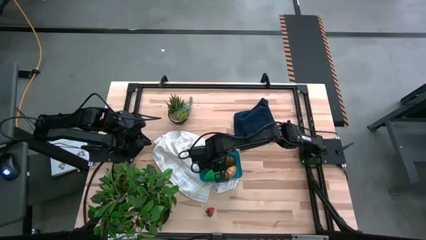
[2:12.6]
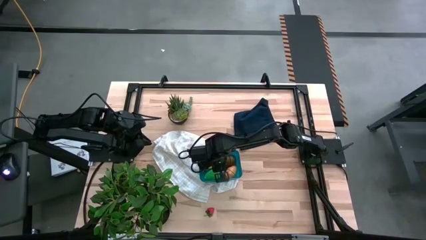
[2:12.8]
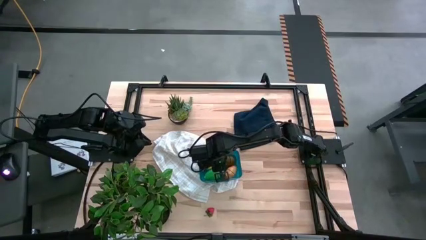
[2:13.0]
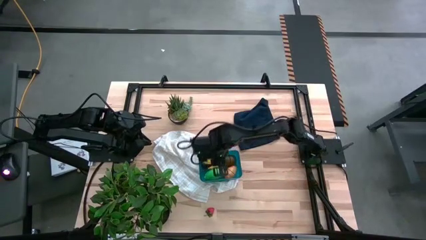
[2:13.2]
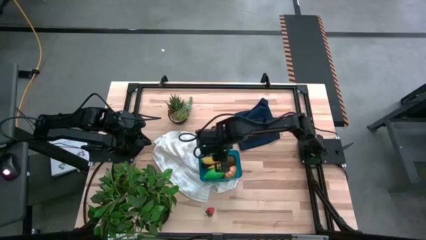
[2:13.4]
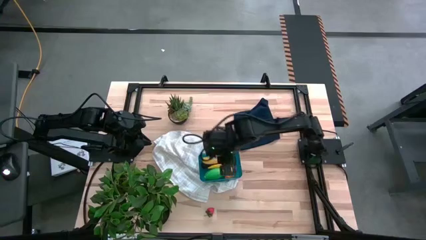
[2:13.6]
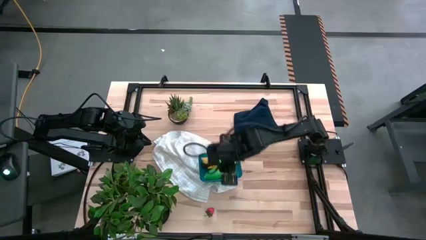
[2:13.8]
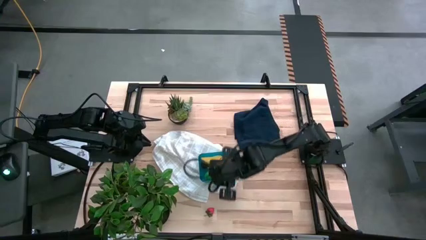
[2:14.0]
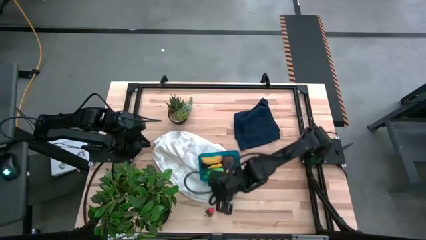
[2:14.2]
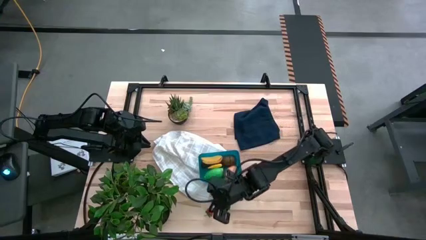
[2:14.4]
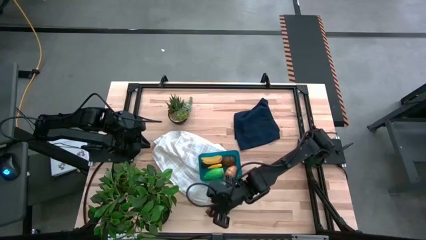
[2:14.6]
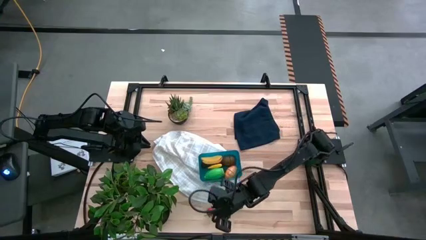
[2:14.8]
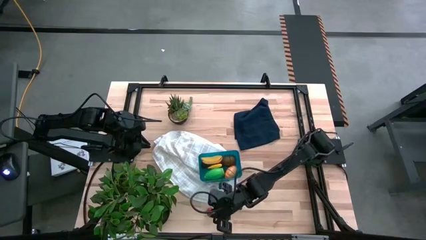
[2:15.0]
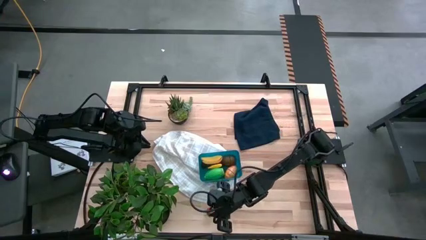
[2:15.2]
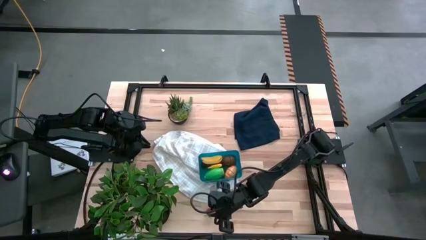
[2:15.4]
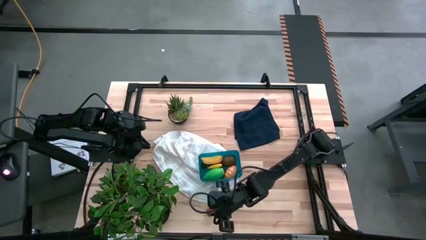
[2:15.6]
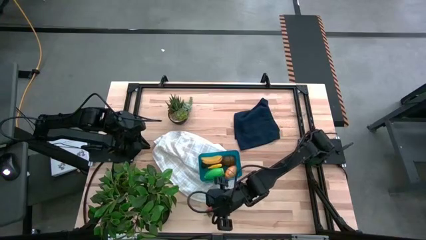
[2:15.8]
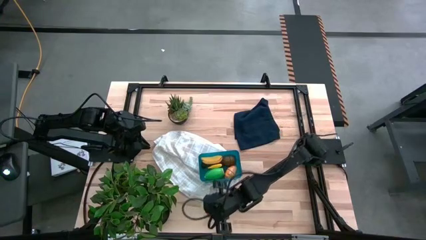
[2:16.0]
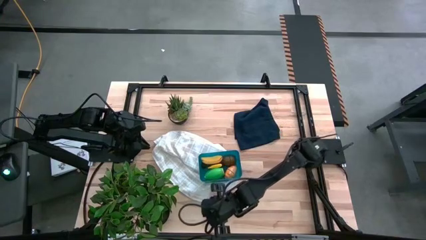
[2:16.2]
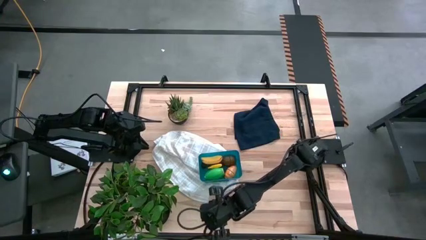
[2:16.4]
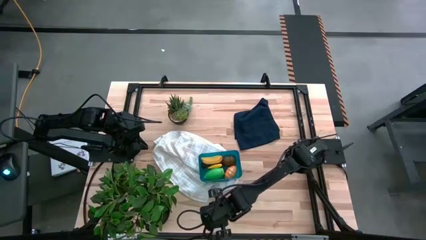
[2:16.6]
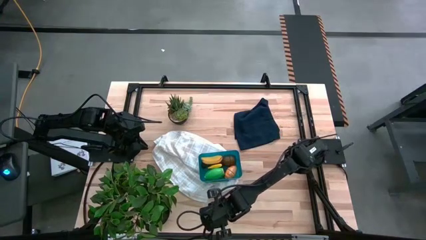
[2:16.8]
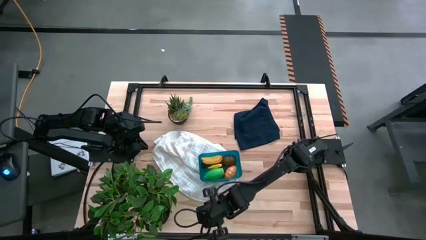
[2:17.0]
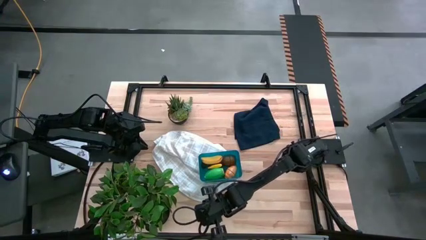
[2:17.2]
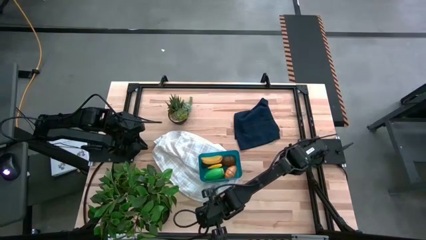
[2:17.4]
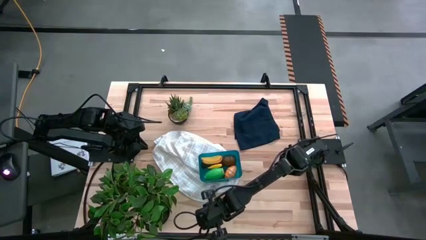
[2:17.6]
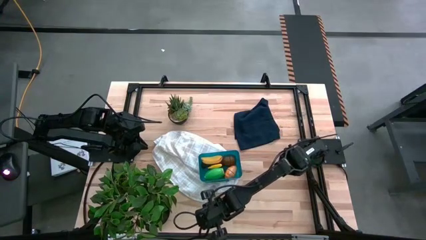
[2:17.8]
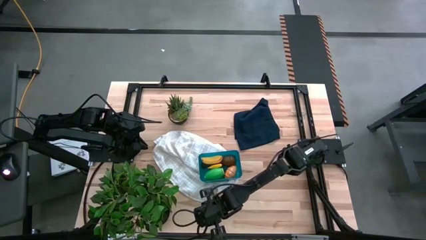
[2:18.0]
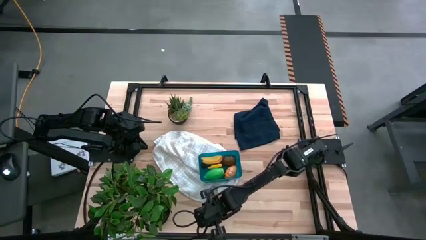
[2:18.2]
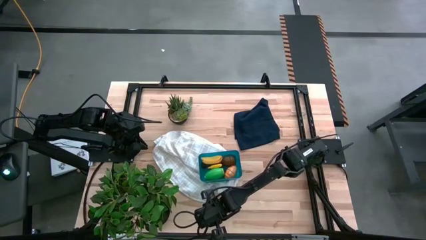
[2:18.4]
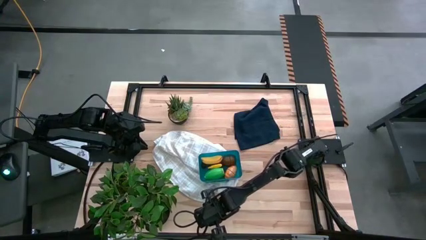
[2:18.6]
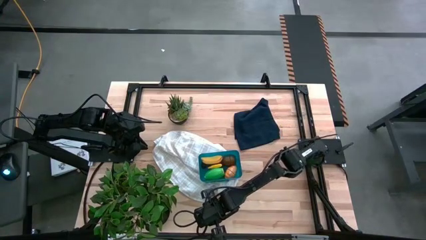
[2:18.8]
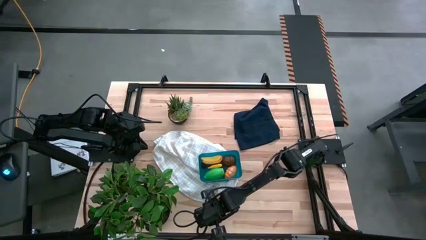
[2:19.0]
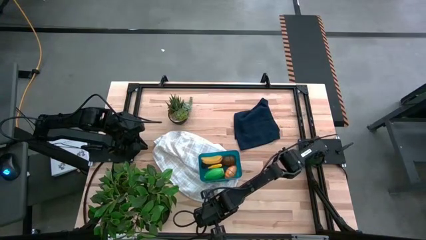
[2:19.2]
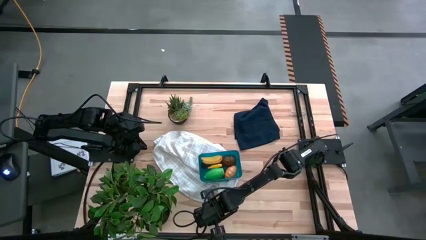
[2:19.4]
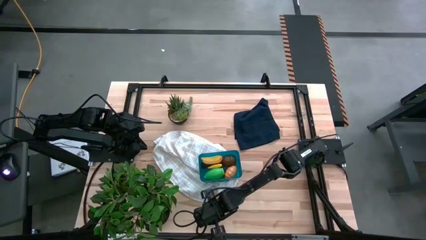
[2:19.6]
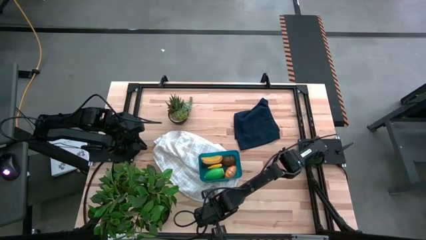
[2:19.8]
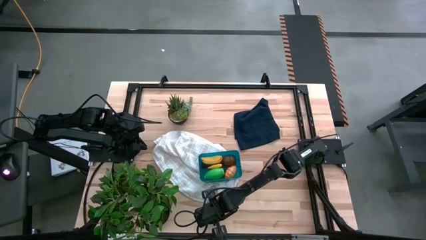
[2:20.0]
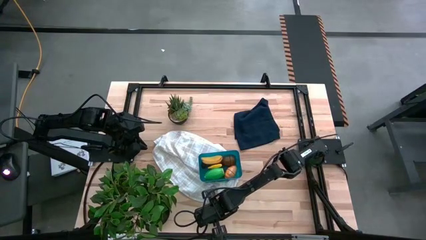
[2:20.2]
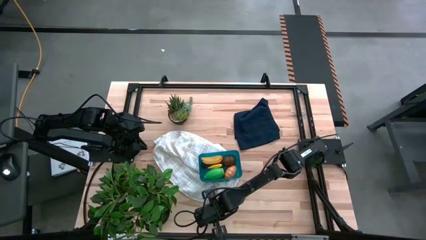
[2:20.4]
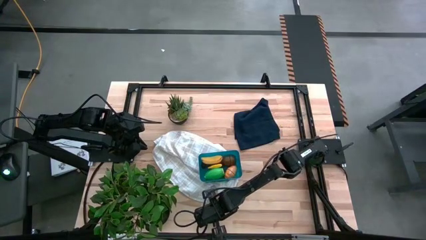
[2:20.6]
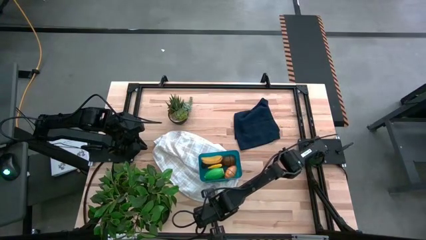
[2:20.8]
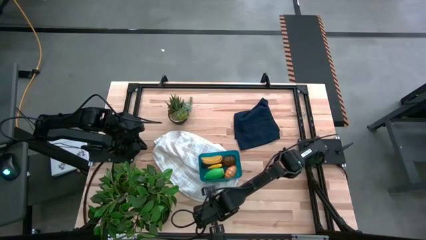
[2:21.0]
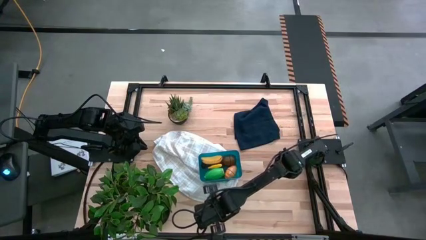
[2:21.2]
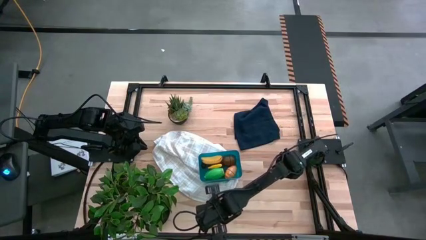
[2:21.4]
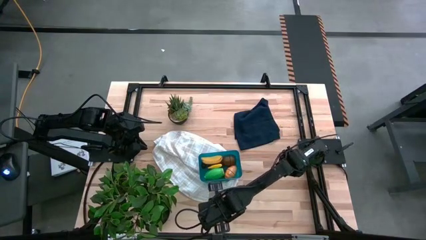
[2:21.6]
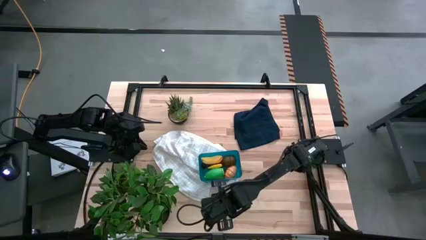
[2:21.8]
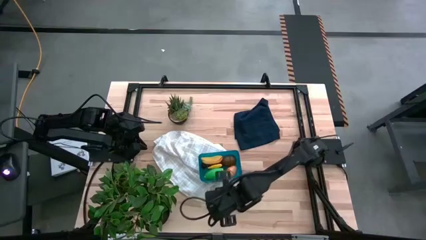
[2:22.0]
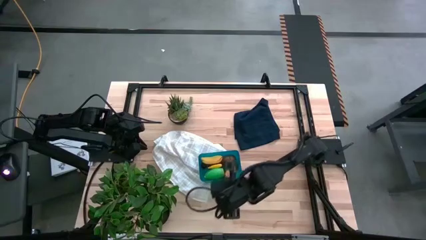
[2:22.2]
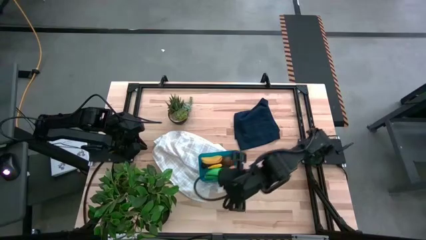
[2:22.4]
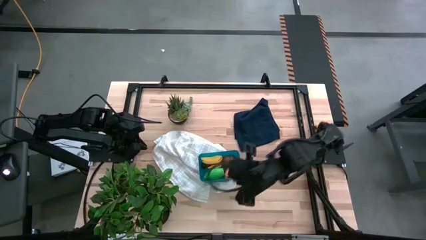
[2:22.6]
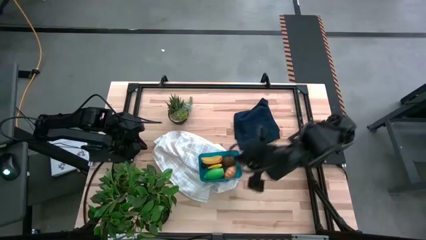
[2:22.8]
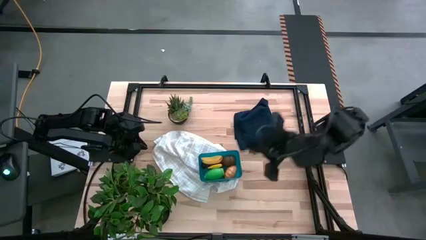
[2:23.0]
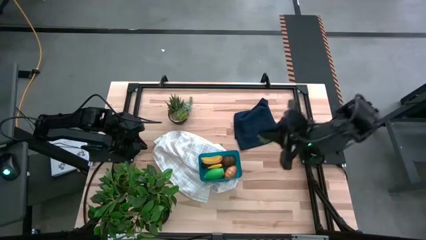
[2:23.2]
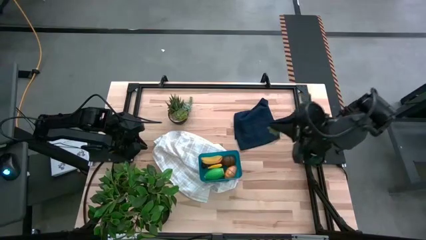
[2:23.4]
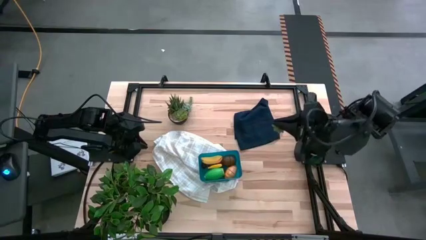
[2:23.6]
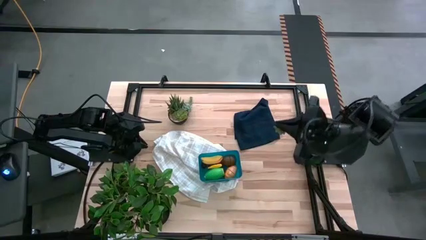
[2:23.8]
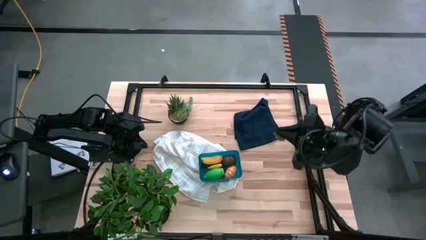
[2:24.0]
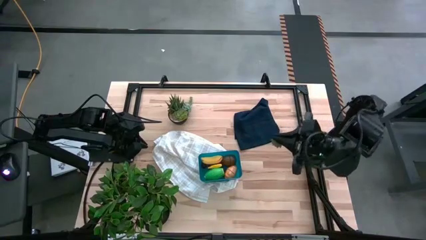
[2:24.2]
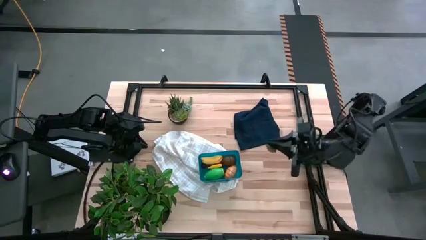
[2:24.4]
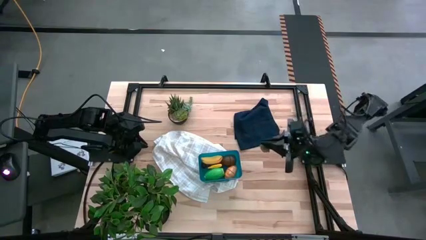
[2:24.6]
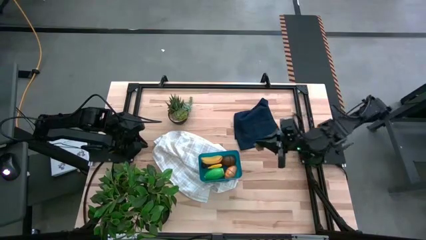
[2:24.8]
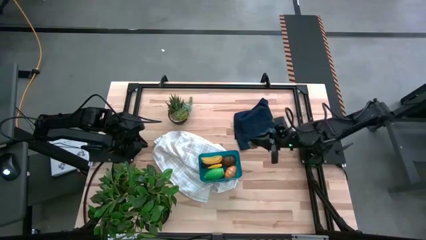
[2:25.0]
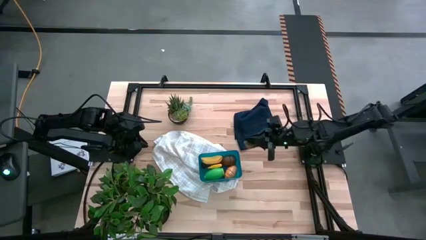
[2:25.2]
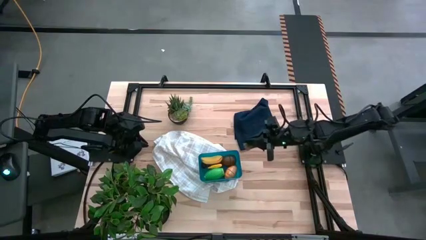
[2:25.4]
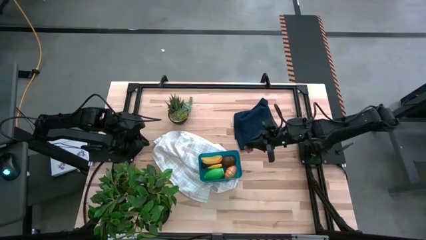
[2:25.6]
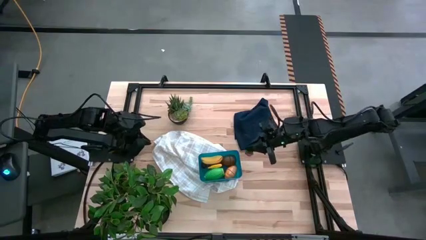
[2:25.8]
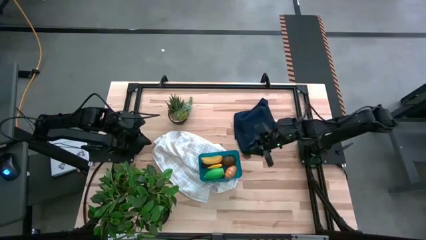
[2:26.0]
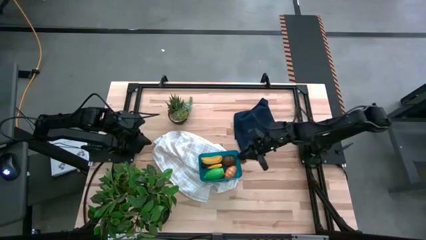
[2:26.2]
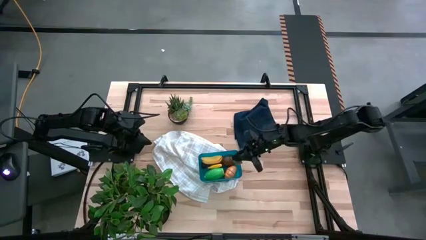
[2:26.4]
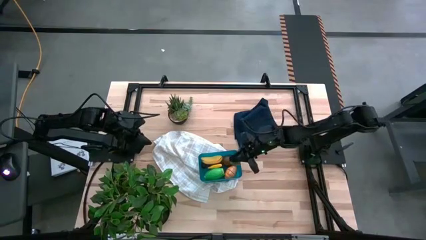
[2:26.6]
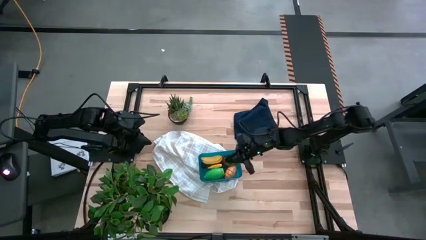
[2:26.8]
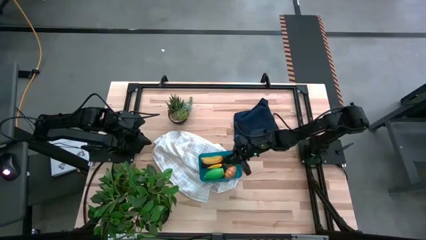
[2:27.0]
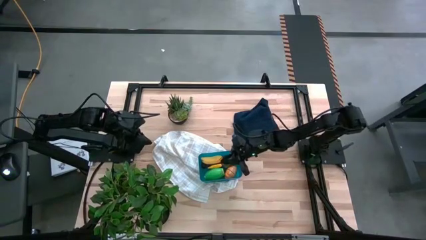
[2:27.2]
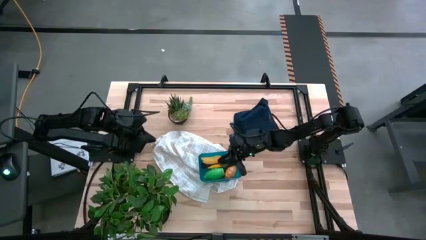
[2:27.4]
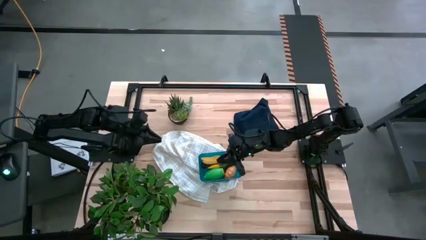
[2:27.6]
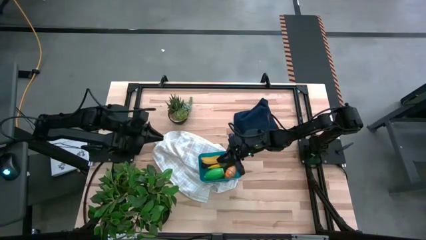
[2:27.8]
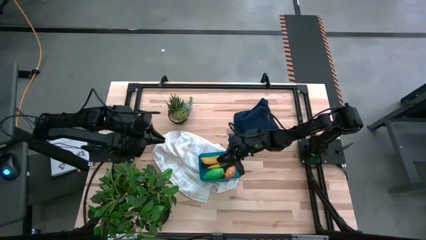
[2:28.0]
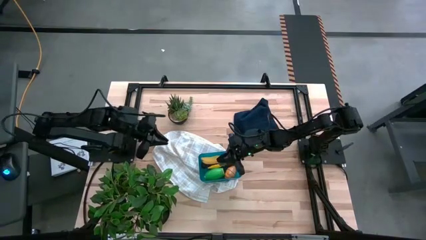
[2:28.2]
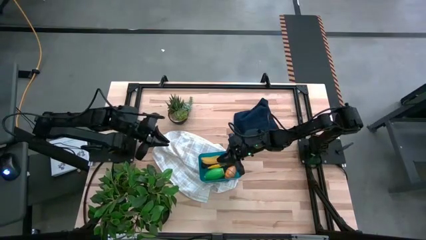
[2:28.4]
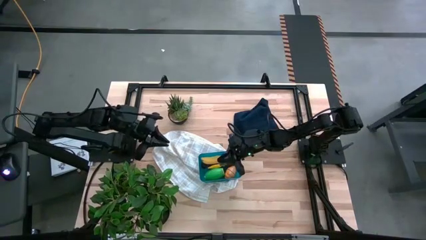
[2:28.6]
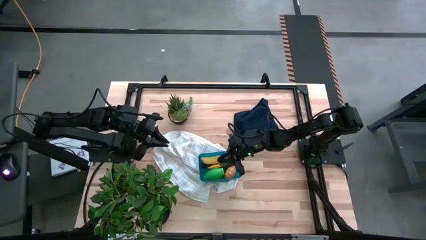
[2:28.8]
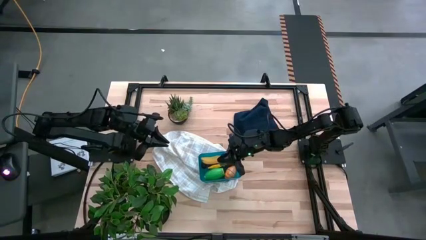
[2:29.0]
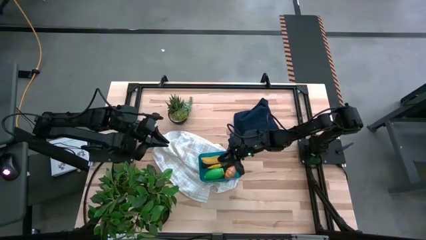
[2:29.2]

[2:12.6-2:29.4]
Task: Pick and placing Produce into tupperware
Put the red strawberry into the blue bin
